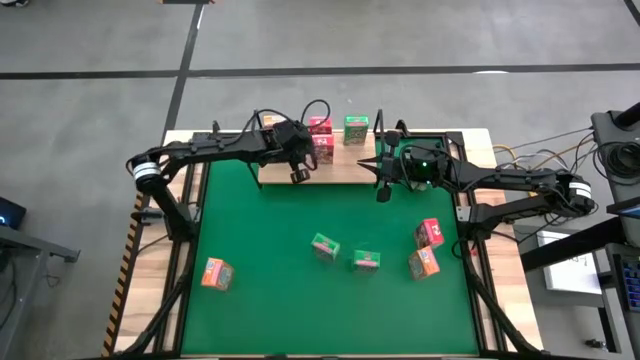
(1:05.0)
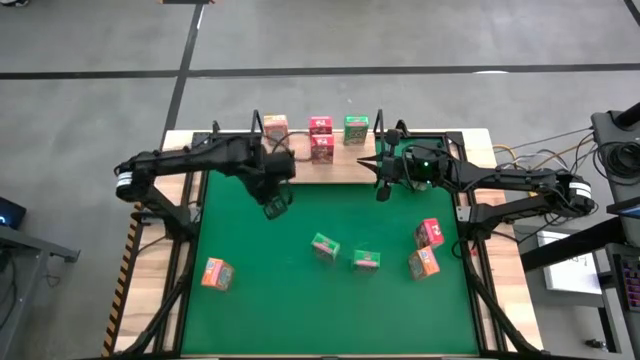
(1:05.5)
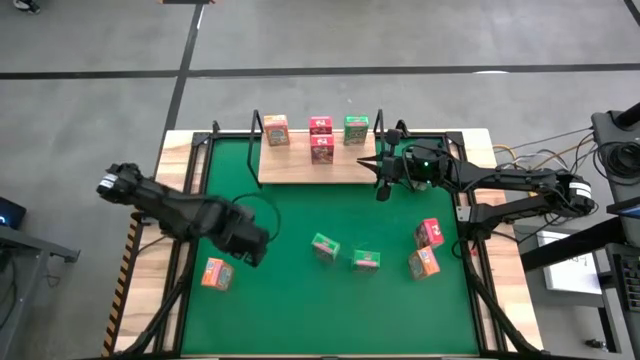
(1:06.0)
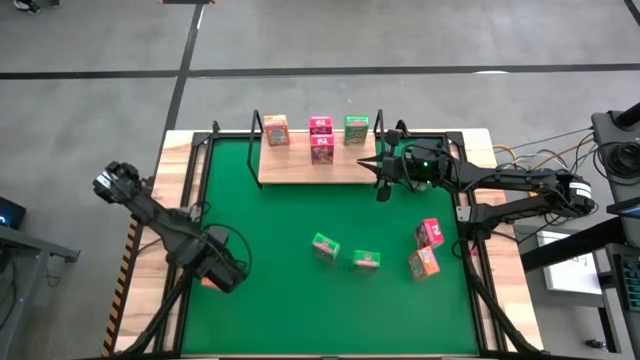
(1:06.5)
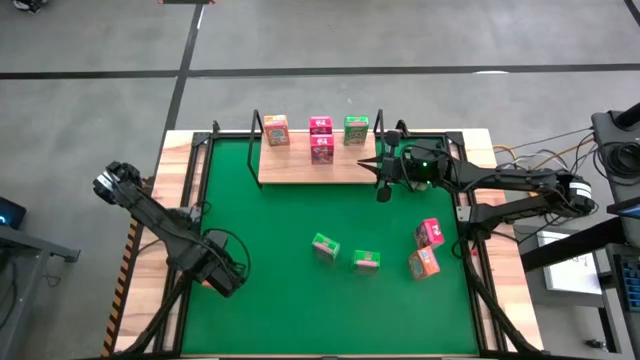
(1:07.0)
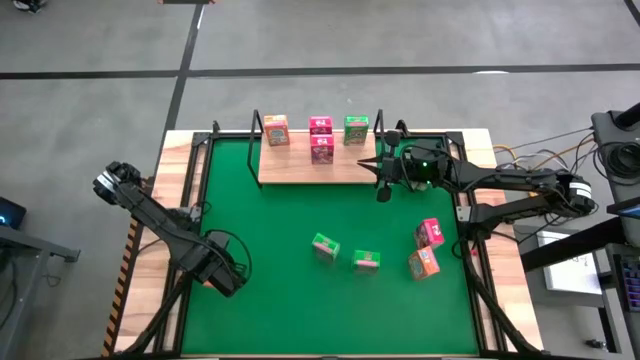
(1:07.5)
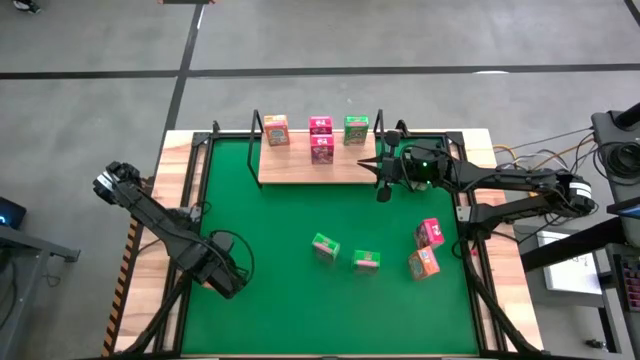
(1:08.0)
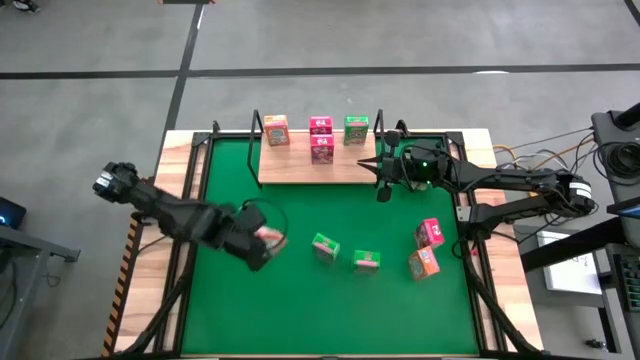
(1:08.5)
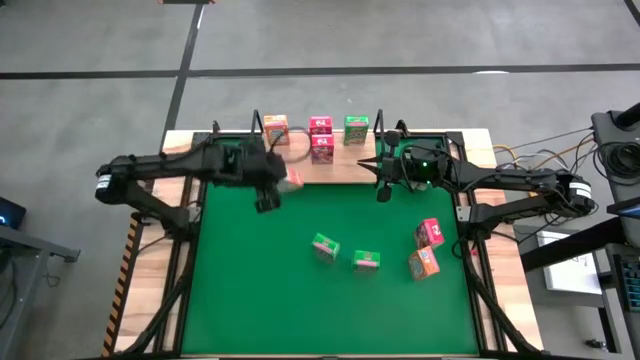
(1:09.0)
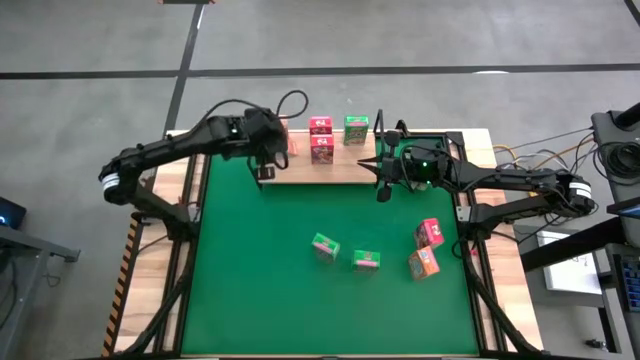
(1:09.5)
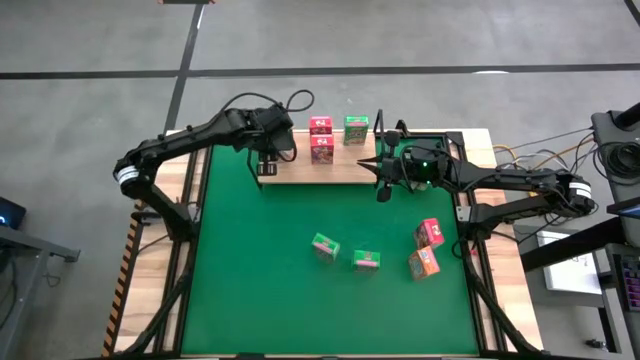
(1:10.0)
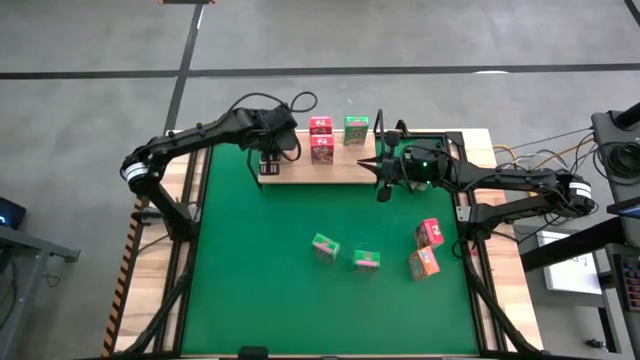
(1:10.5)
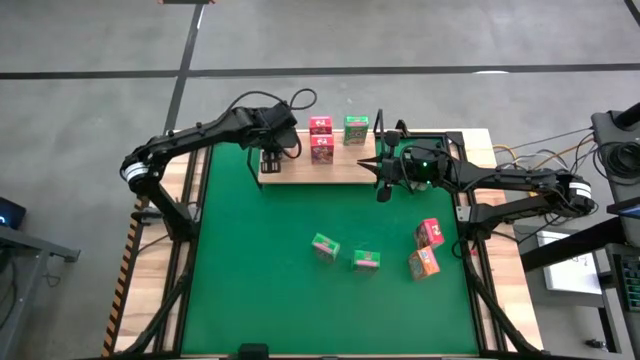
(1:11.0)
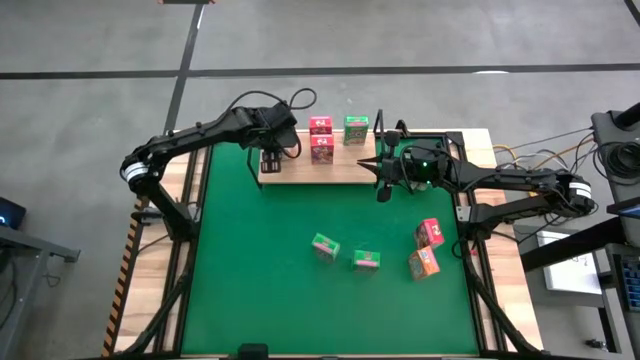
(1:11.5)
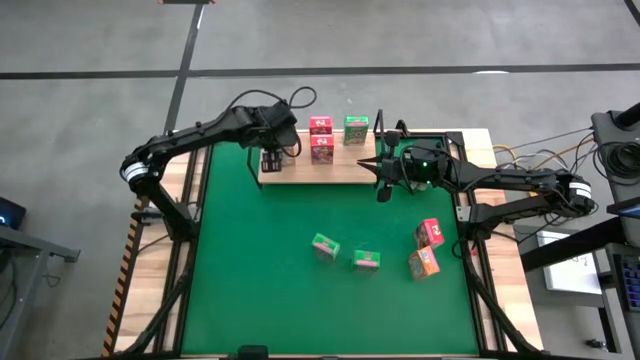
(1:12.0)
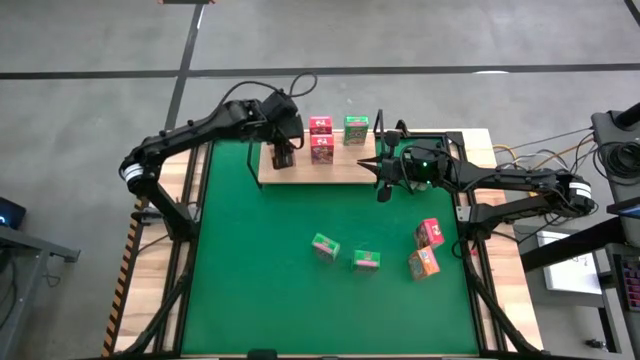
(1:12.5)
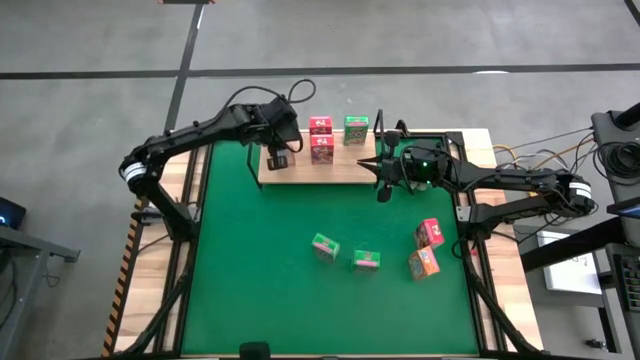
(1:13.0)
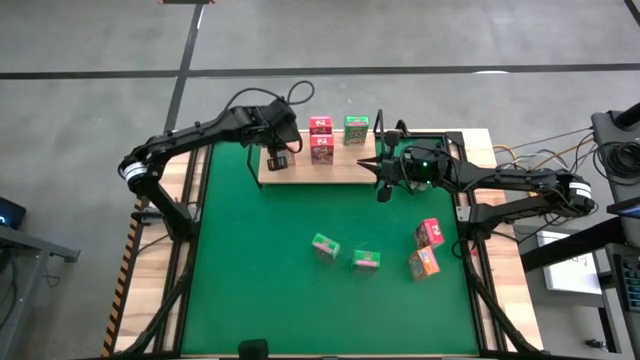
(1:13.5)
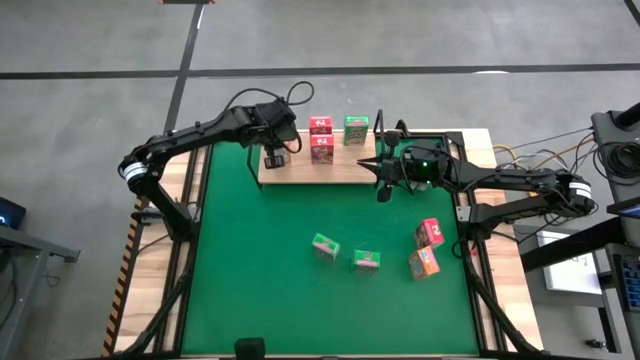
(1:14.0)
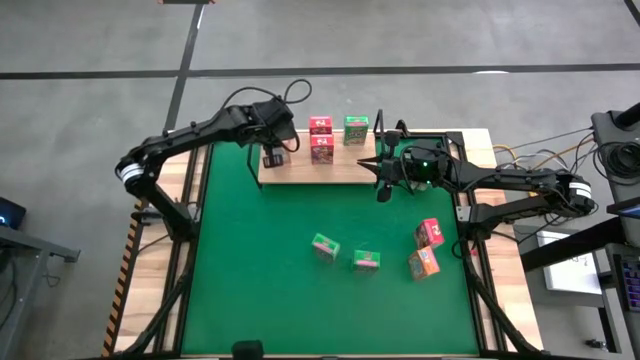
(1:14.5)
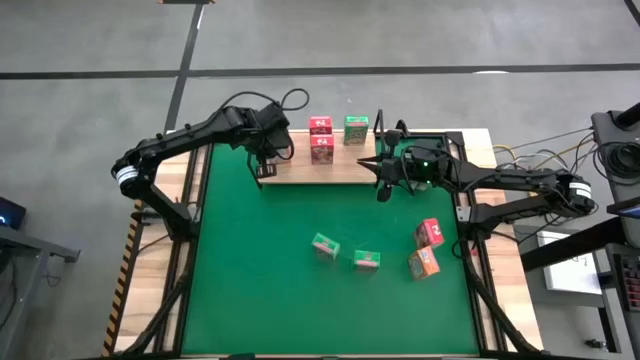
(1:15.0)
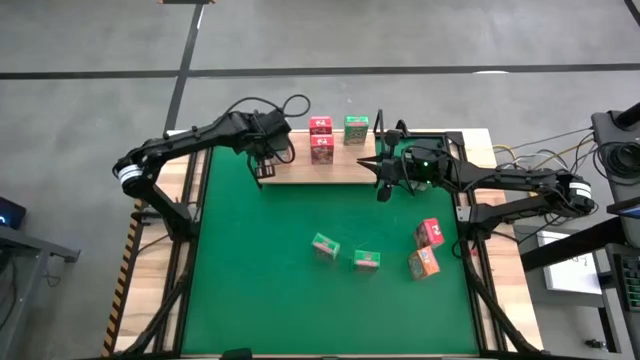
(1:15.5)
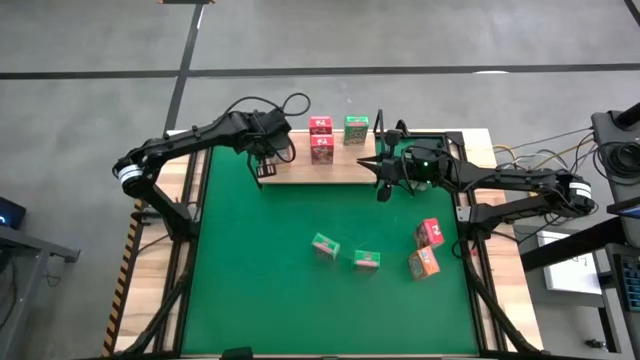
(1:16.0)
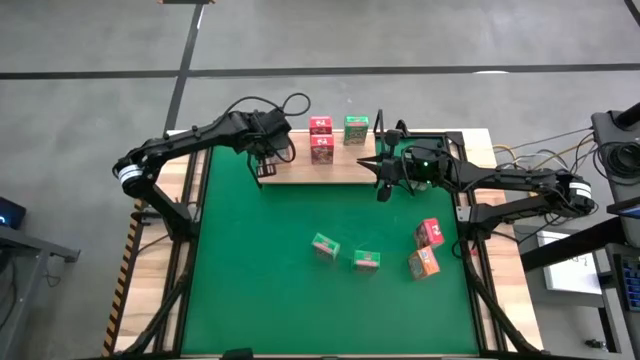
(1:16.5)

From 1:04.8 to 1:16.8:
Task: Stack cereal on shelf
Put the left orange cereal box on the shelf aligned with the other orange cereal box

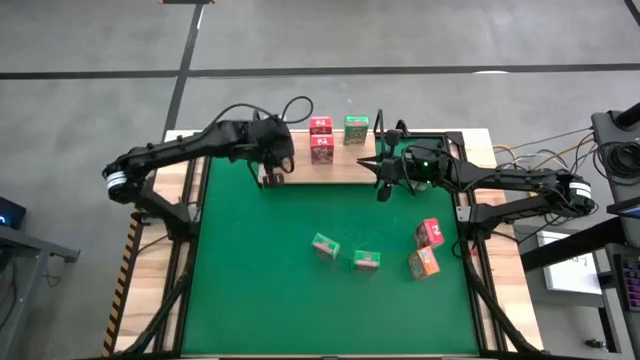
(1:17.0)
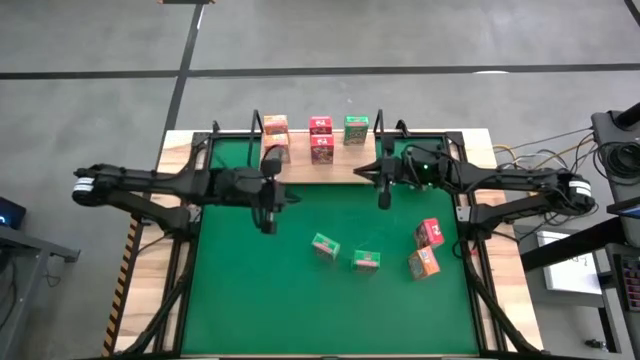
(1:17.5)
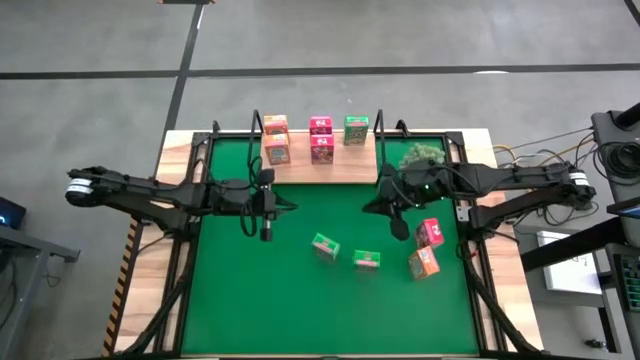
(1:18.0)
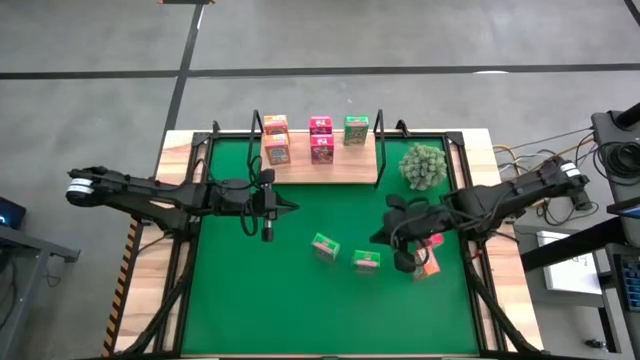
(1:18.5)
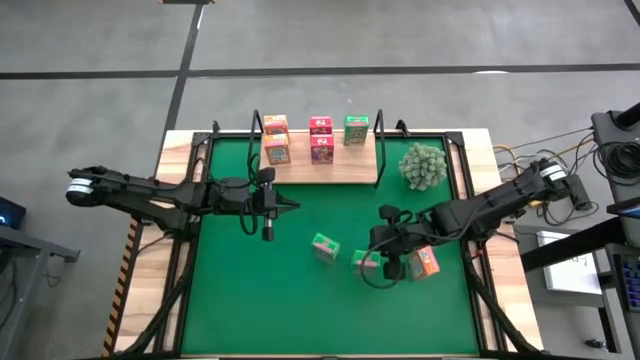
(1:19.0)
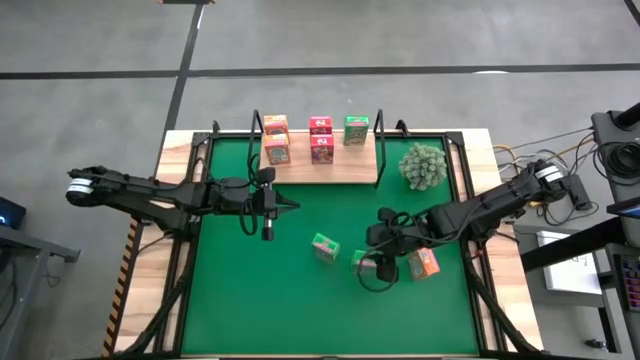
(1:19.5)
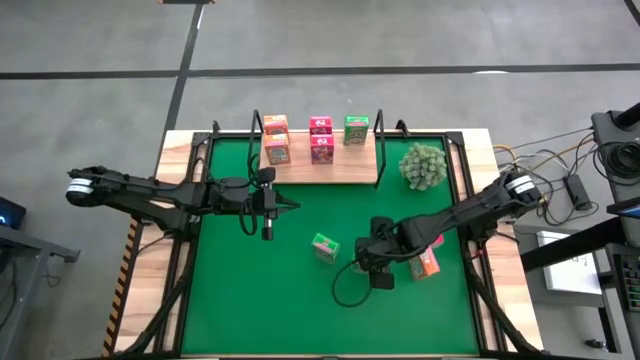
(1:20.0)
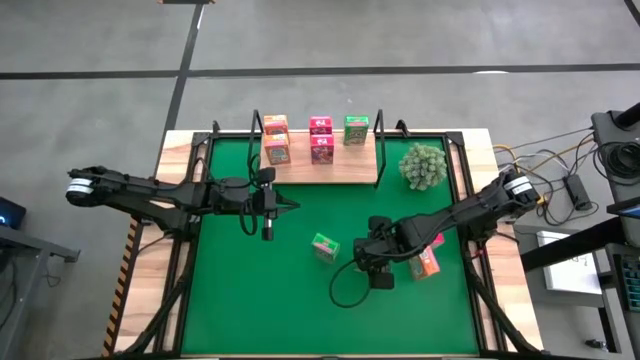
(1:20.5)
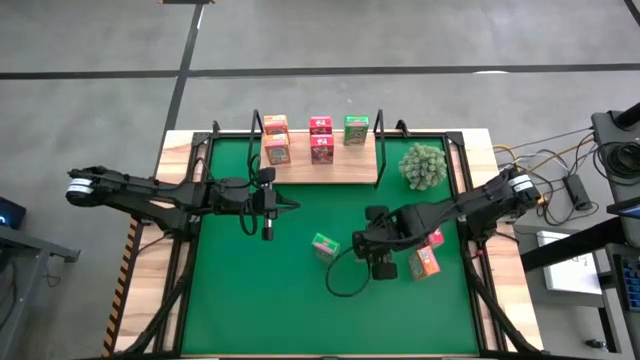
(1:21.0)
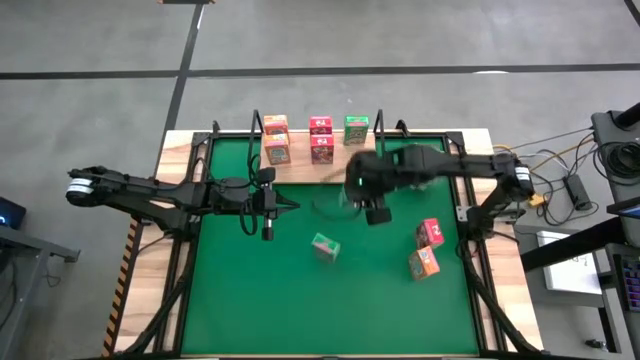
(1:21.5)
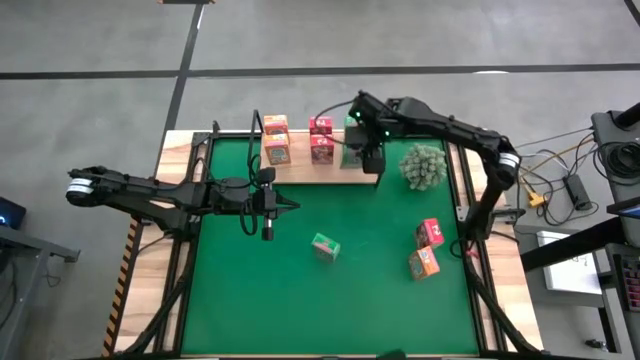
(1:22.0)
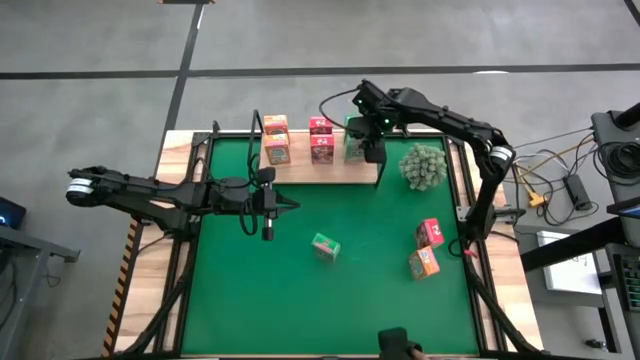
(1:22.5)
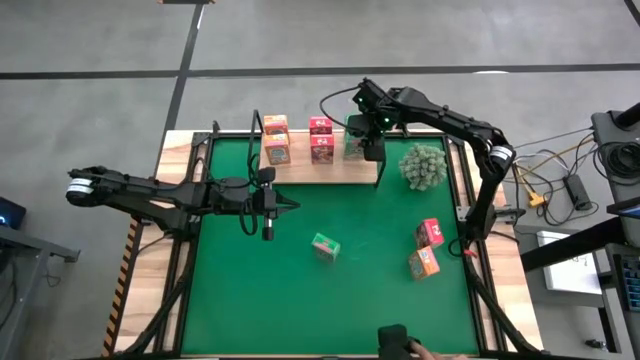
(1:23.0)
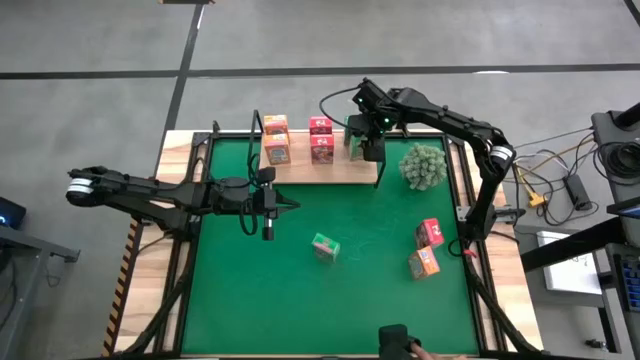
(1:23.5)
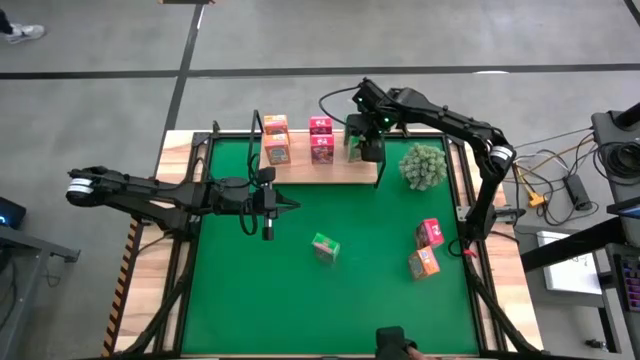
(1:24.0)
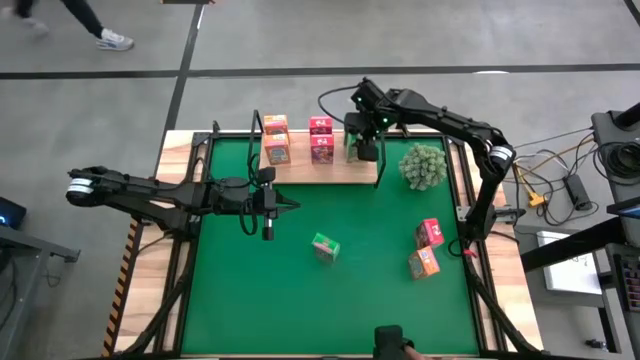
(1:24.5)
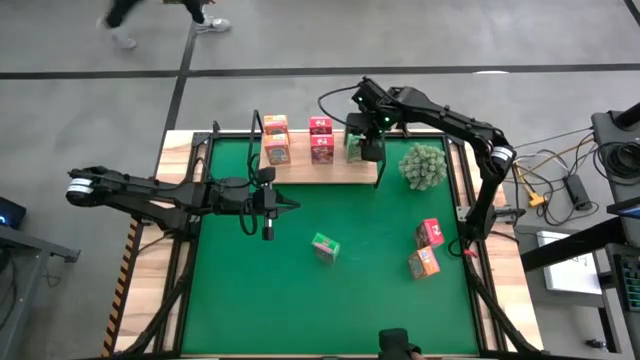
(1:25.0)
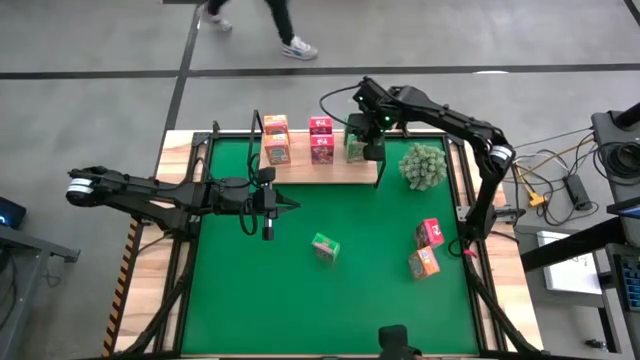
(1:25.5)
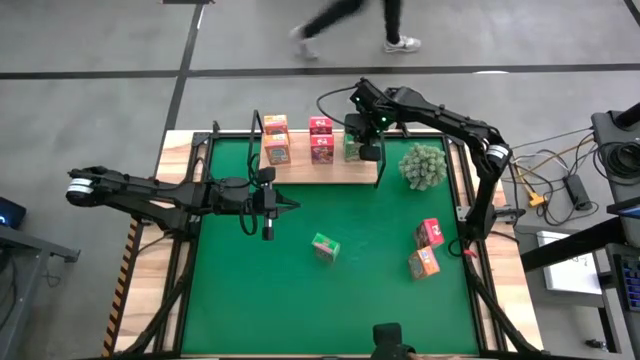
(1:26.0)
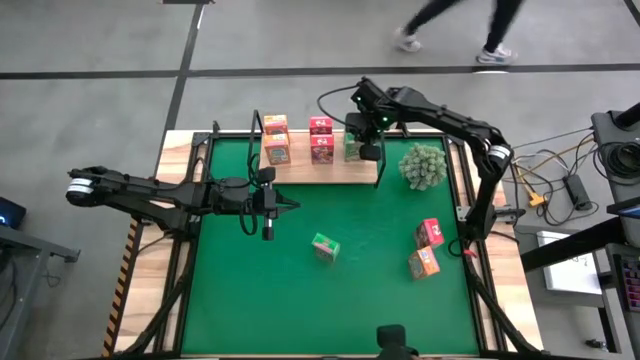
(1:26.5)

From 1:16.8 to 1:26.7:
Put the right green cereal box on the shelf aligned with the other green cereal box

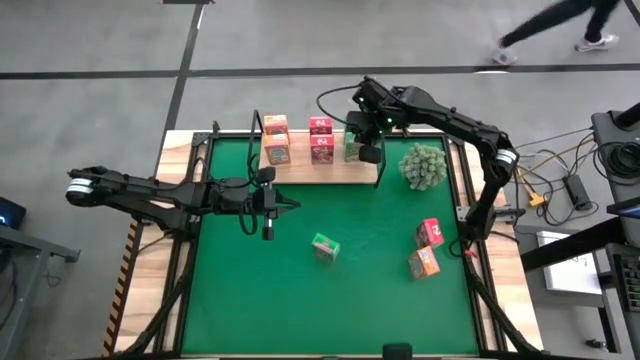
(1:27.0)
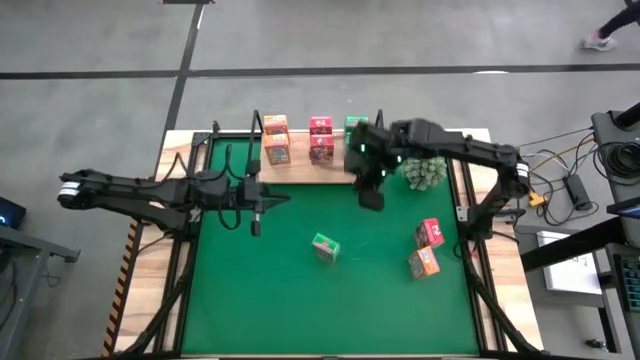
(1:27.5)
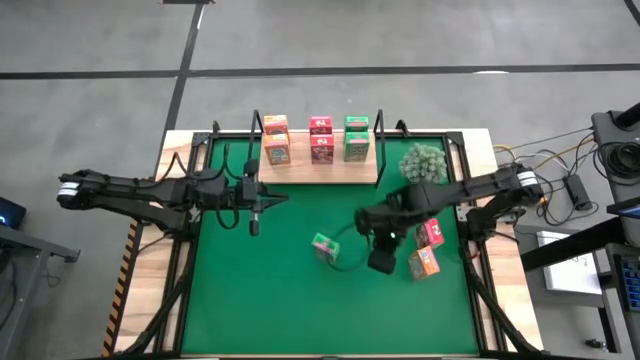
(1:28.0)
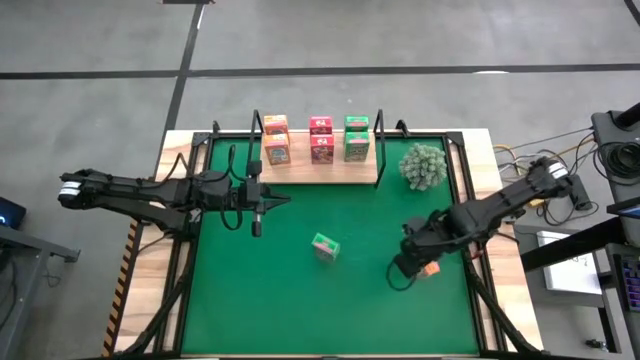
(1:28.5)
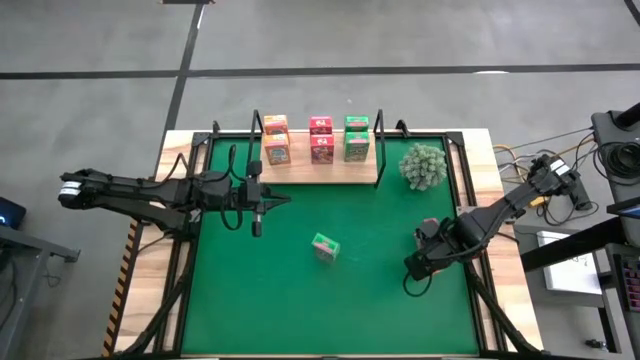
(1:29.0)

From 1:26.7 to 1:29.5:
Put the orange cereal box on the shelf aligned with the other orange cereal boxes
